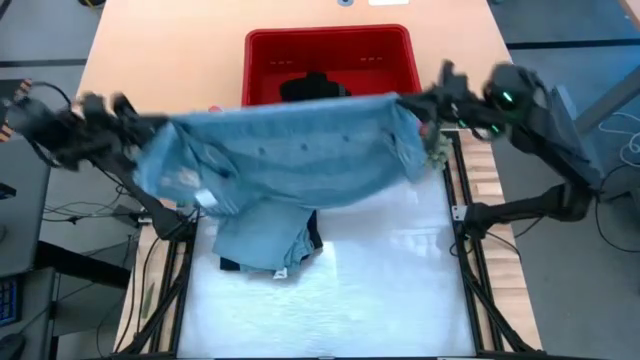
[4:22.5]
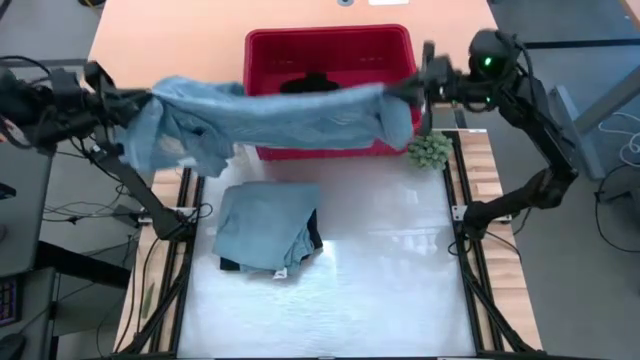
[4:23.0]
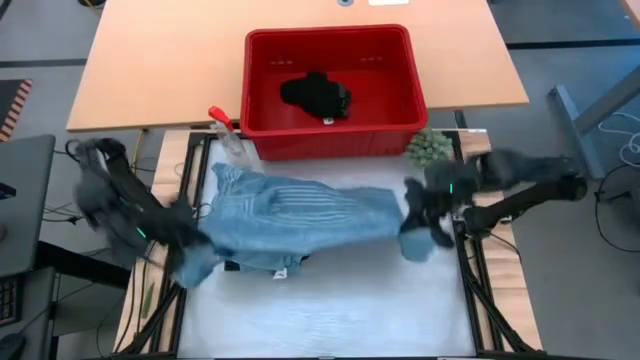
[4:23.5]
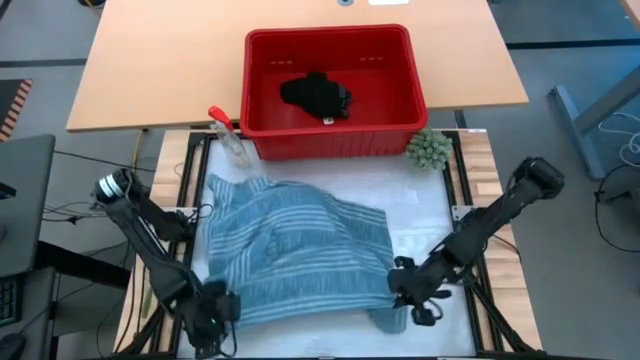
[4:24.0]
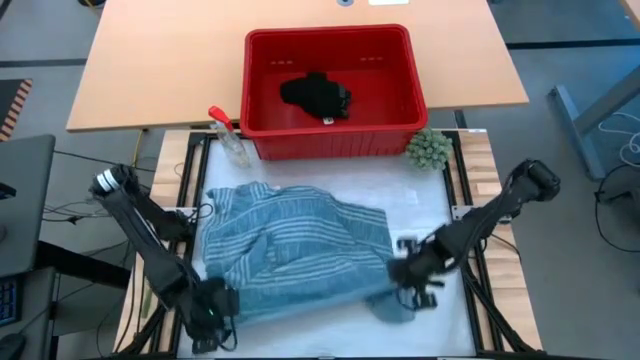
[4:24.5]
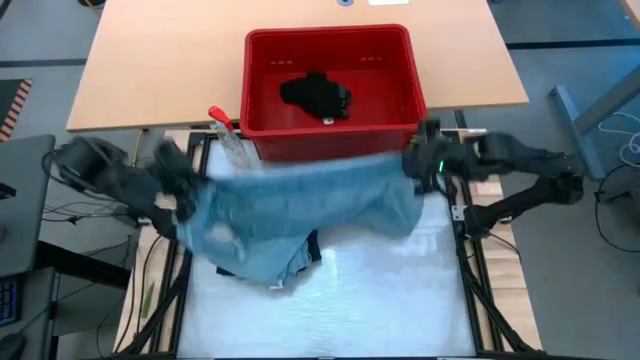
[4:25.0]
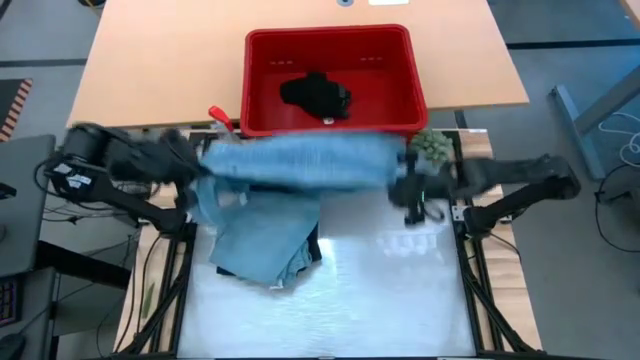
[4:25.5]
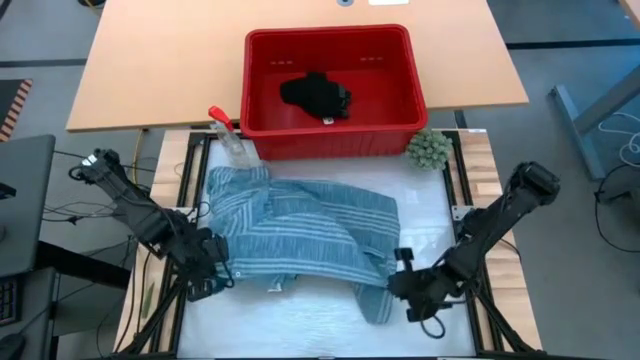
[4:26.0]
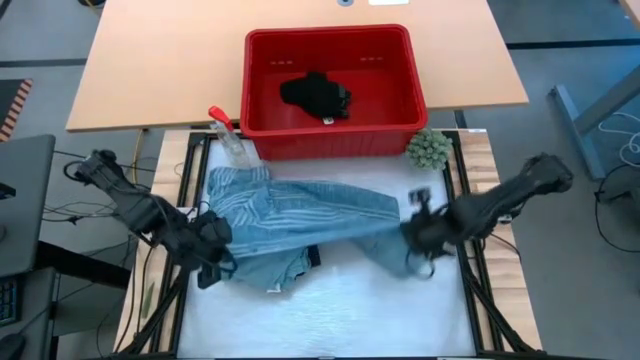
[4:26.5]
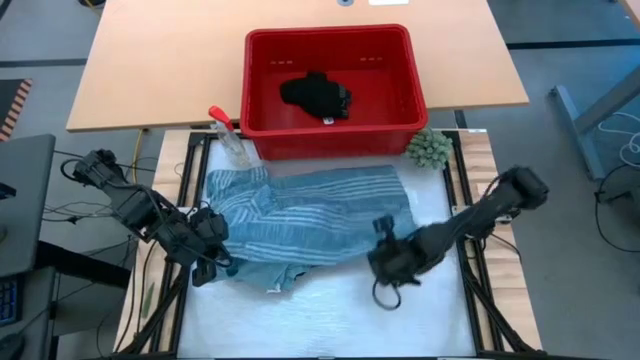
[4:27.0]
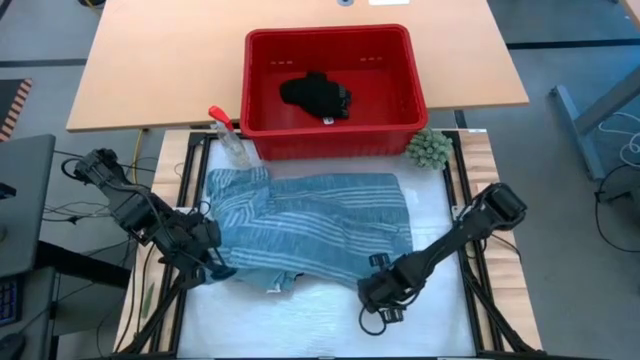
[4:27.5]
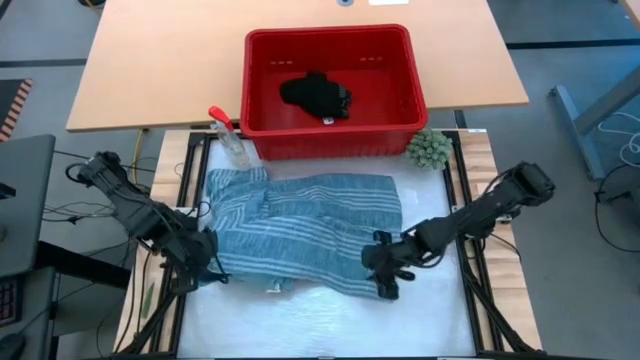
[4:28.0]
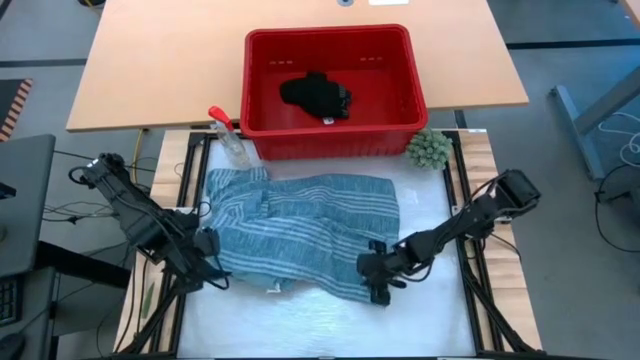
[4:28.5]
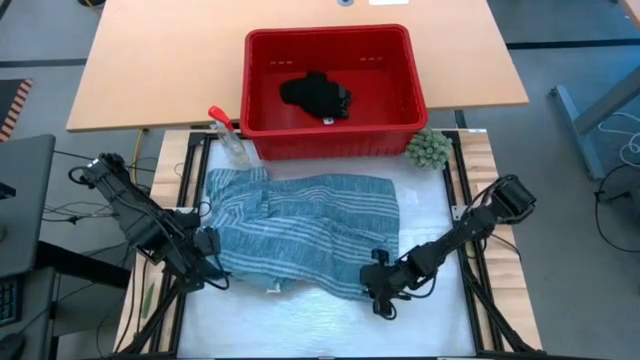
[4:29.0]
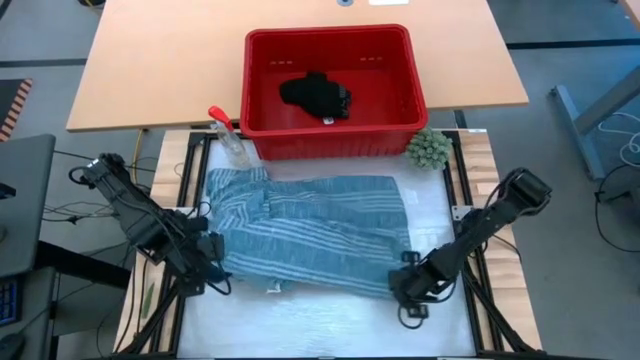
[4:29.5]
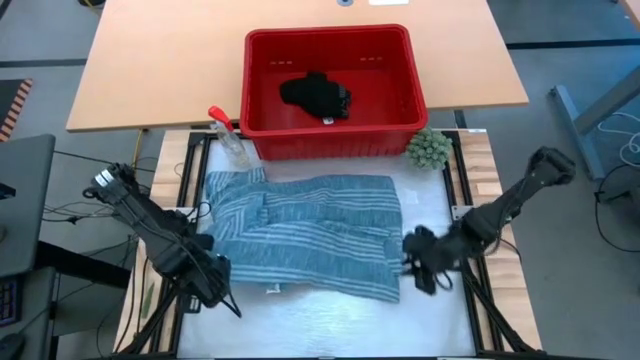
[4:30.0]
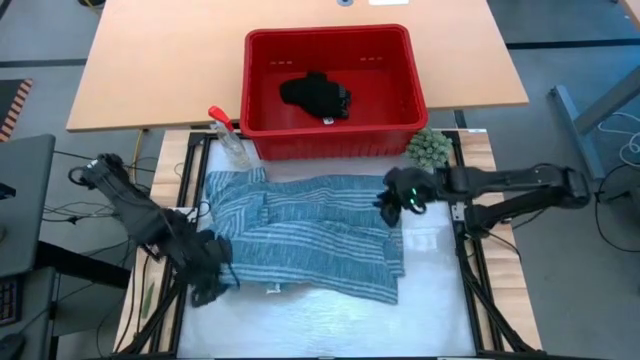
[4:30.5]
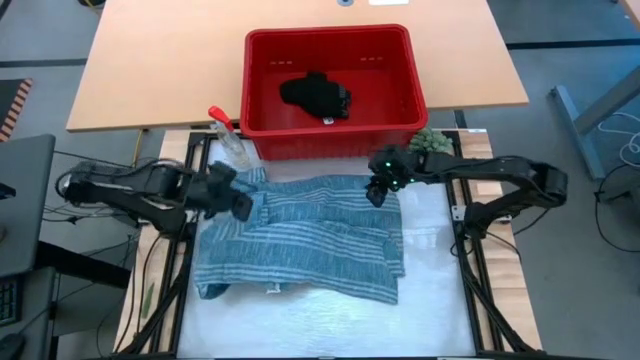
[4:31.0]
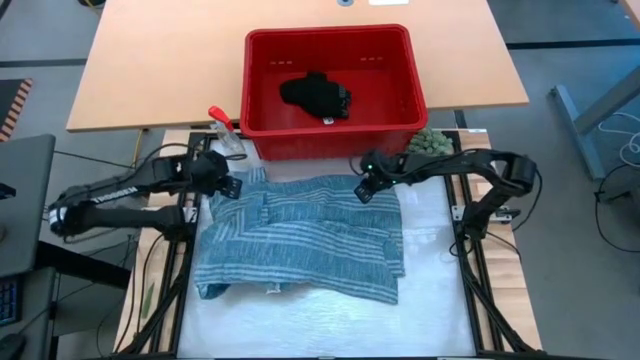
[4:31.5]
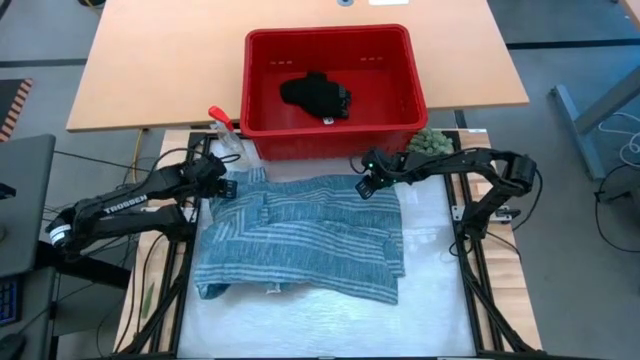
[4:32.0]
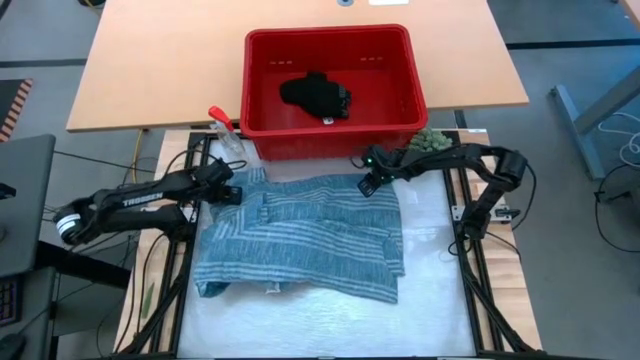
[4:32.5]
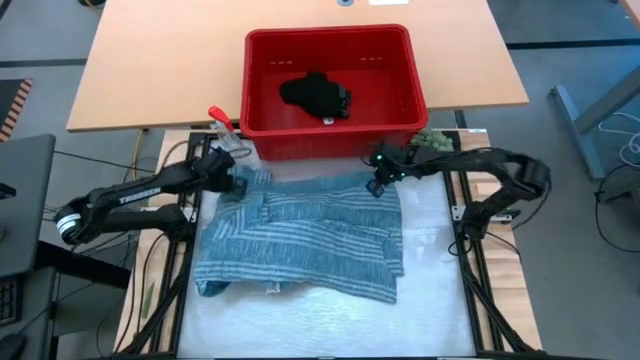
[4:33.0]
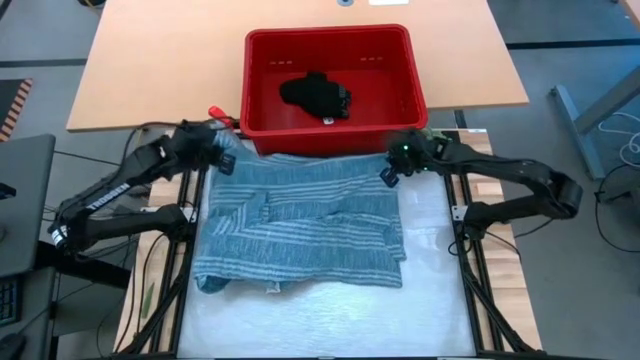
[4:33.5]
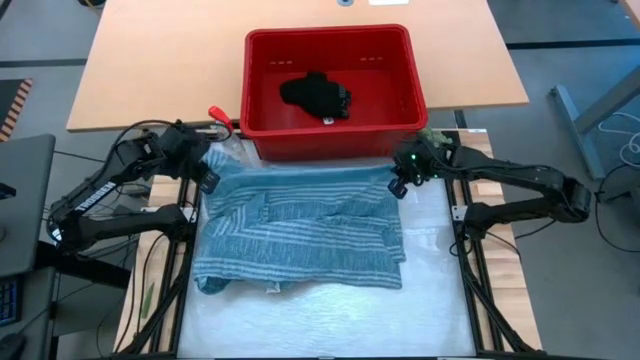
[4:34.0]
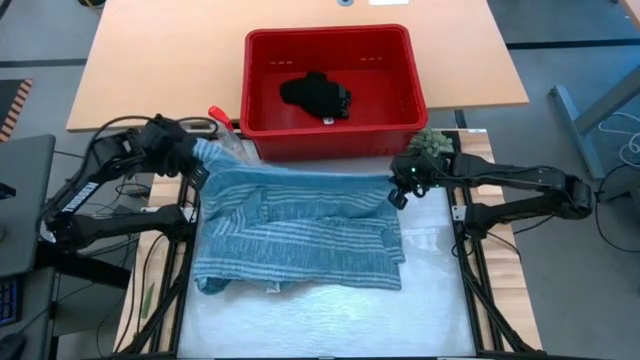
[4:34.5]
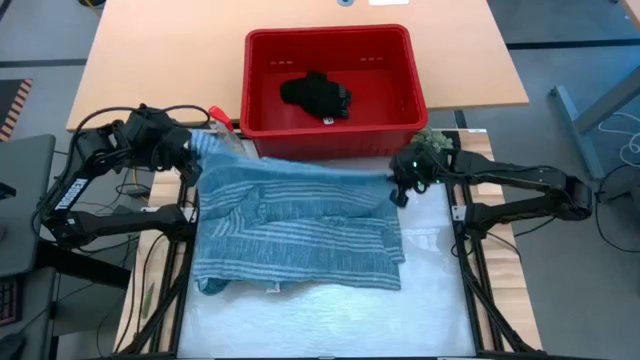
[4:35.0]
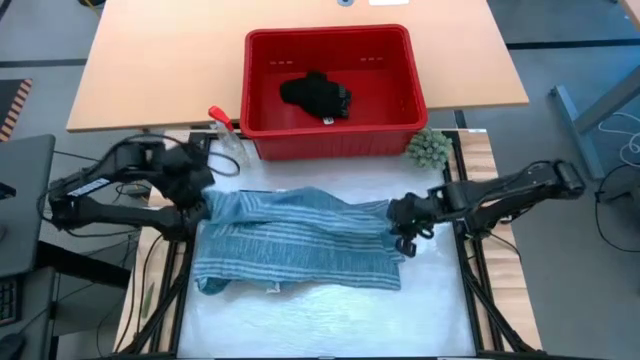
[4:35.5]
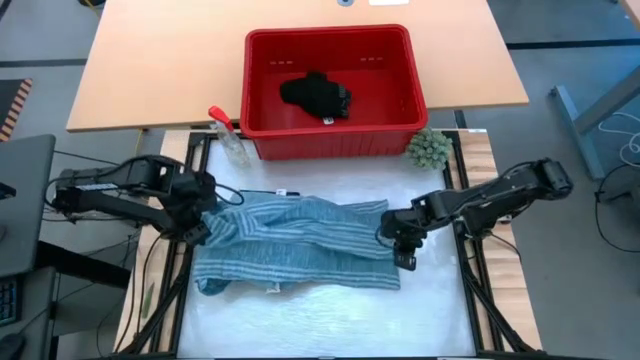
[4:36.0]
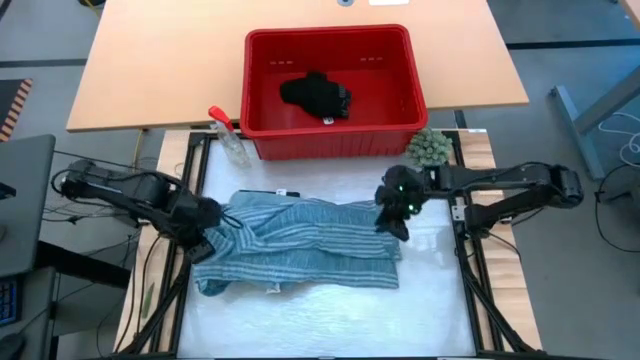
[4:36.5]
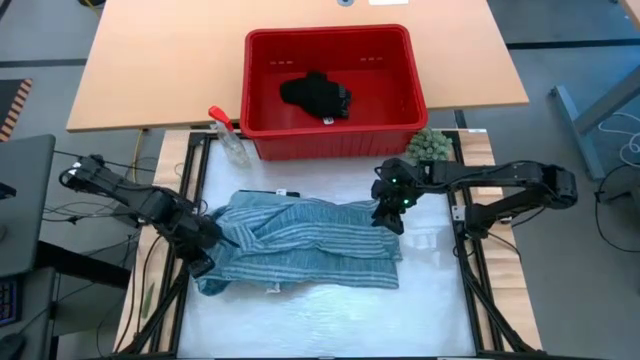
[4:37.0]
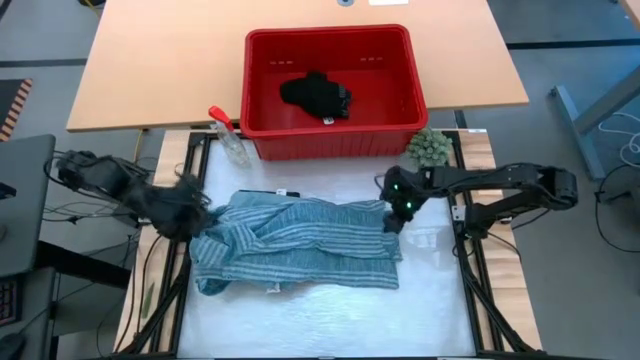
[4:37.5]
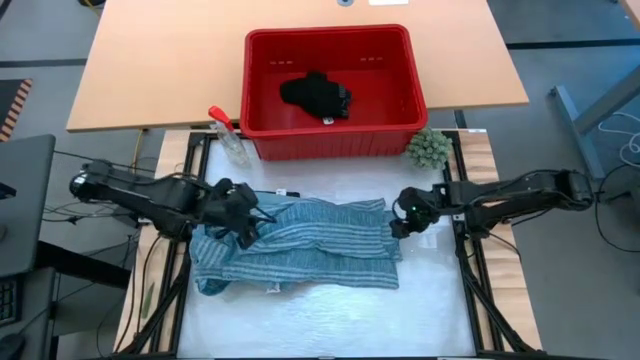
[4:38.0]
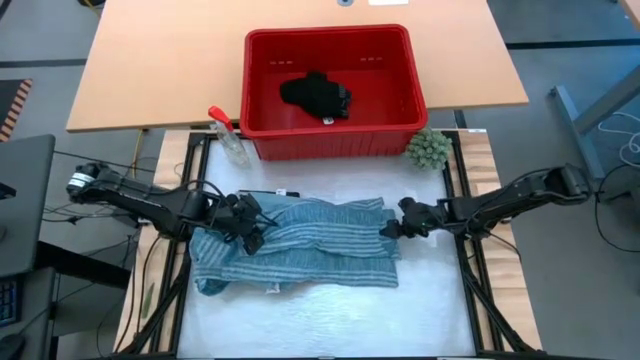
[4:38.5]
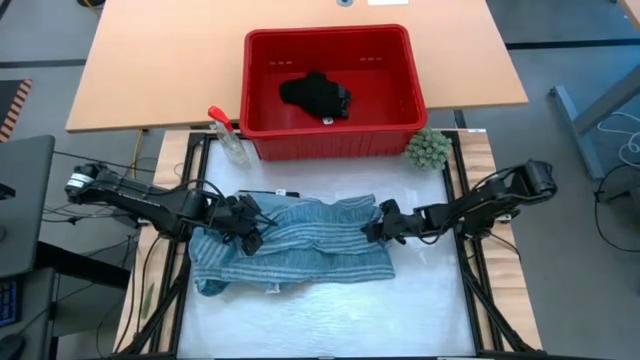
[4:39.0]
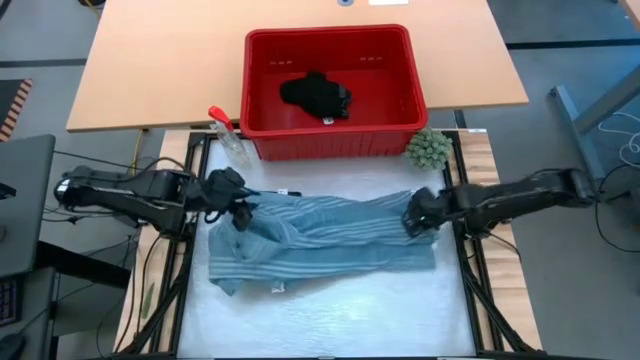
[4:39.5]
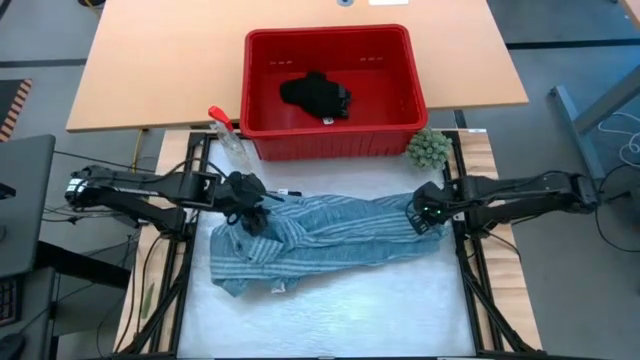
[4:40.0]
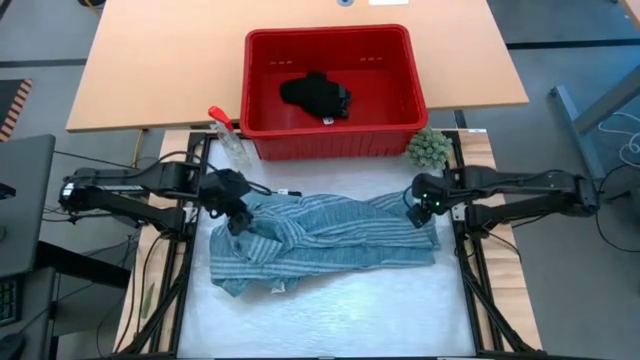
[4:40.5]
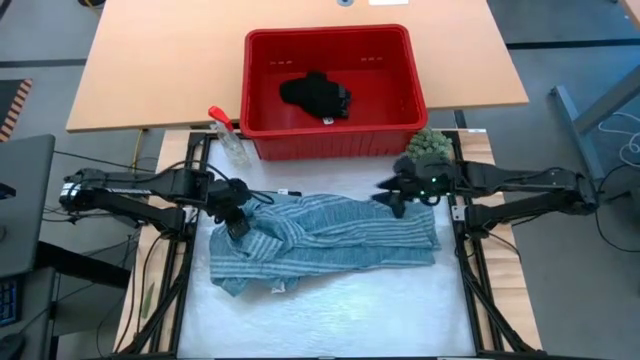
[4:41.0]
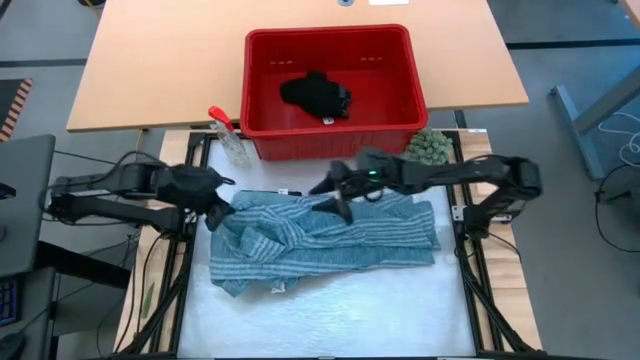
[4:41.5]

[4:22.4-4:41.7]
Task: Fold Laundry from Bin
Fold the light blue polo shirt

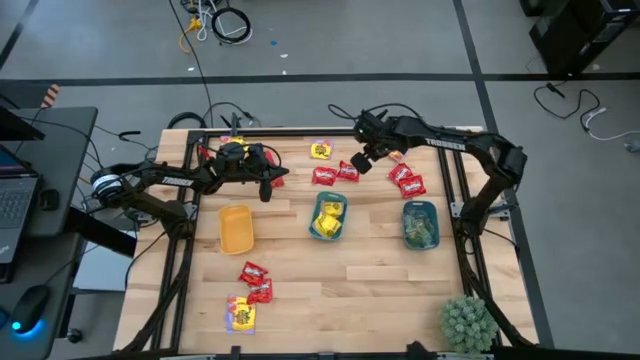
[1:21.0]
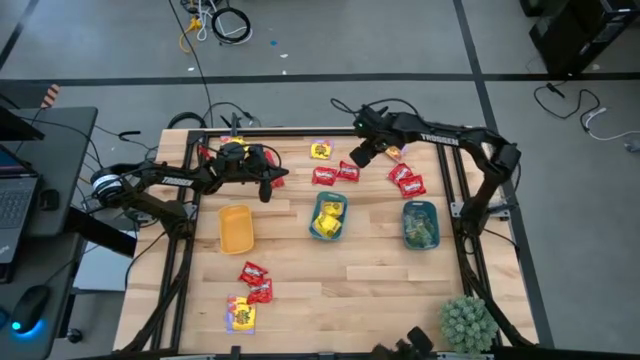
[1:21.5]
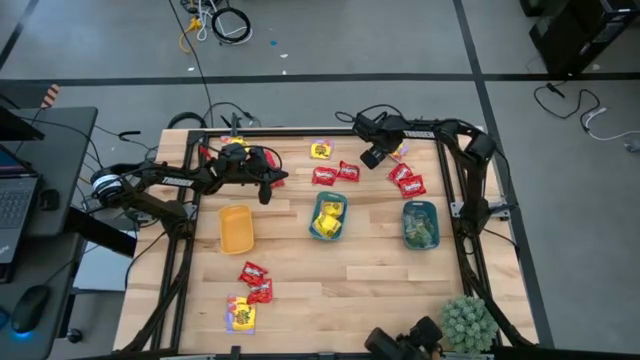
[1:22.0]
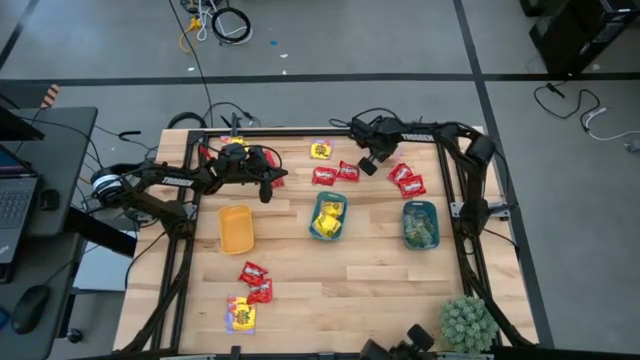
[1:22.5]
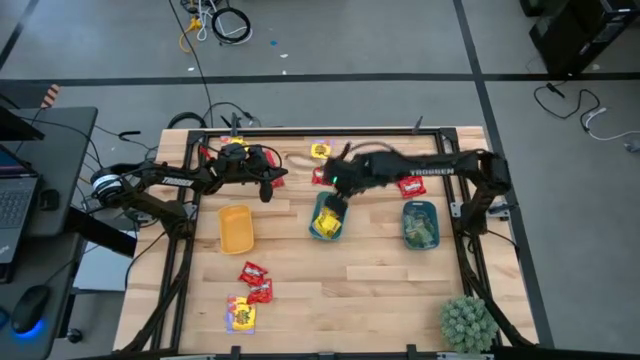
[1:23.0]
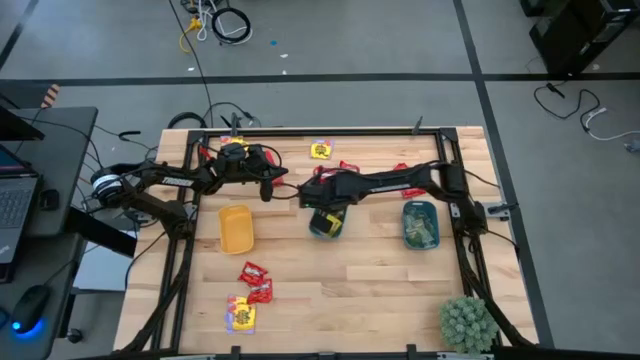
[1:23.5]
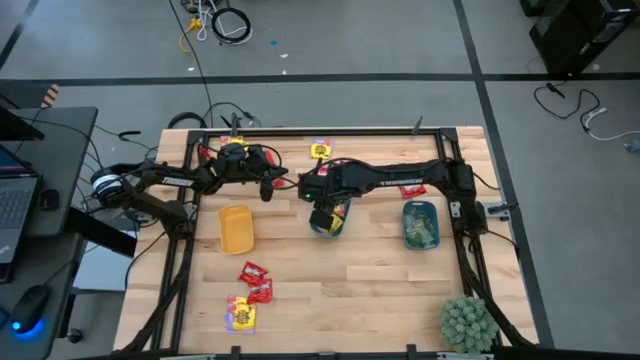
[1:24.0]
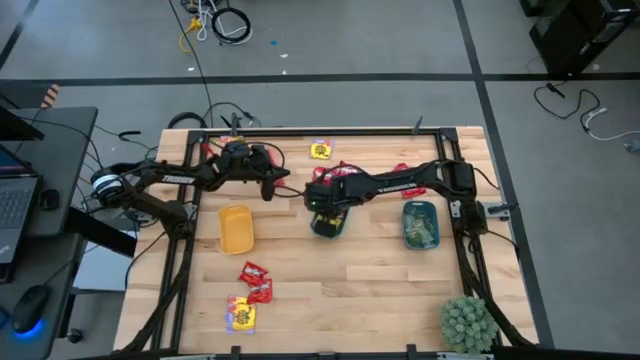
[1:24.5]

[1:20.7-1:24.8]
Task: Sort candy
Put the yellow candy pack into the green bin
